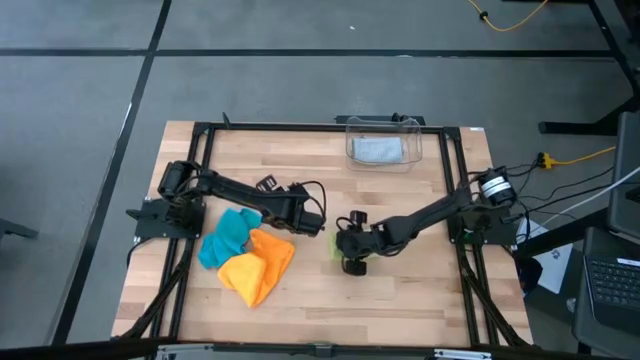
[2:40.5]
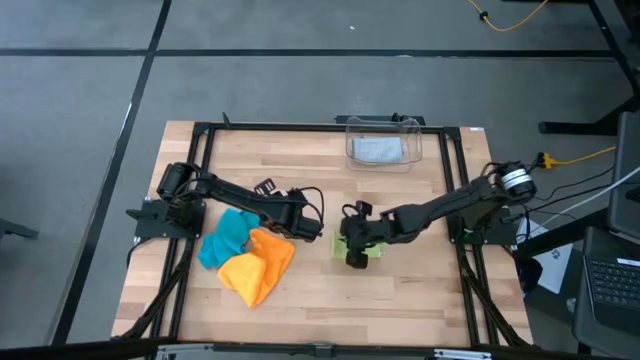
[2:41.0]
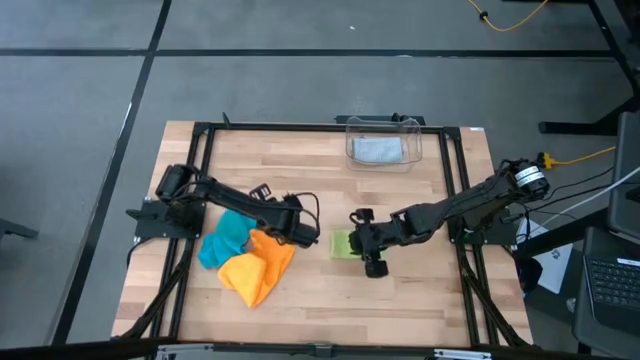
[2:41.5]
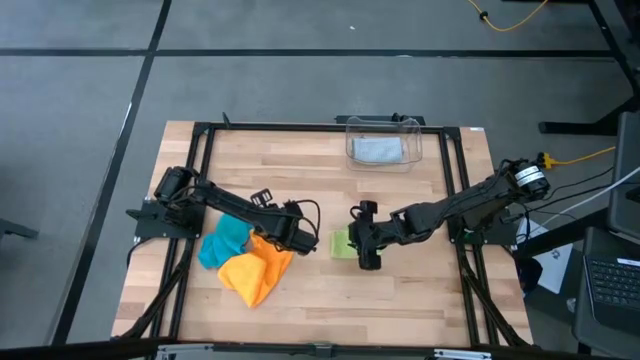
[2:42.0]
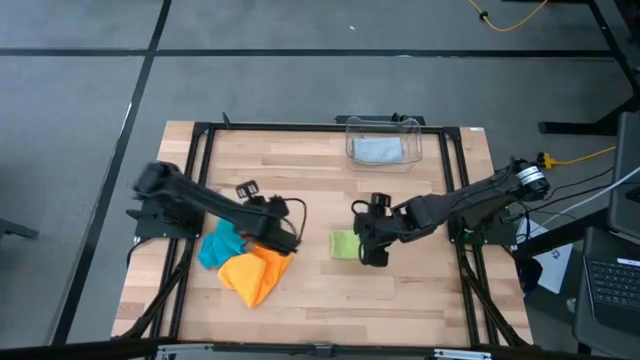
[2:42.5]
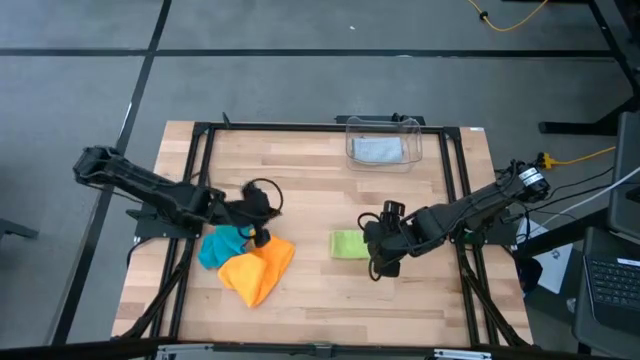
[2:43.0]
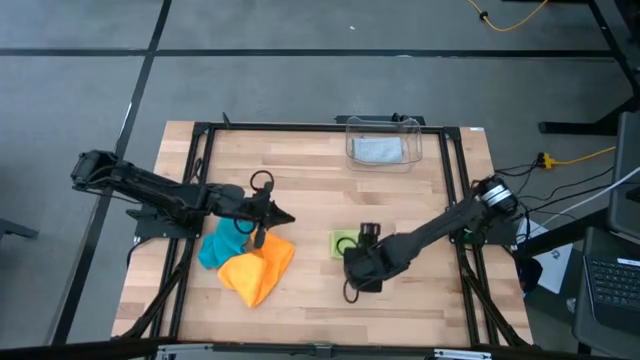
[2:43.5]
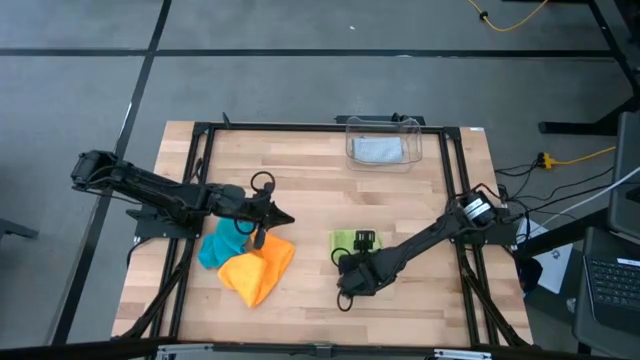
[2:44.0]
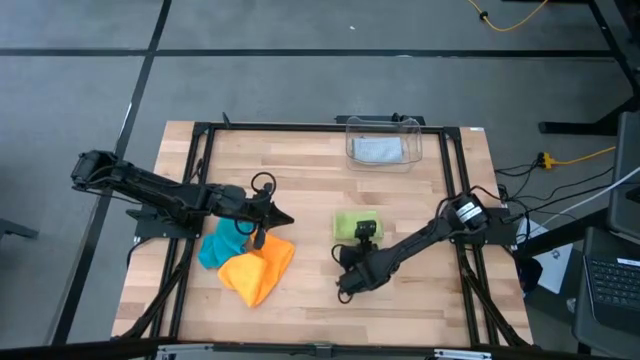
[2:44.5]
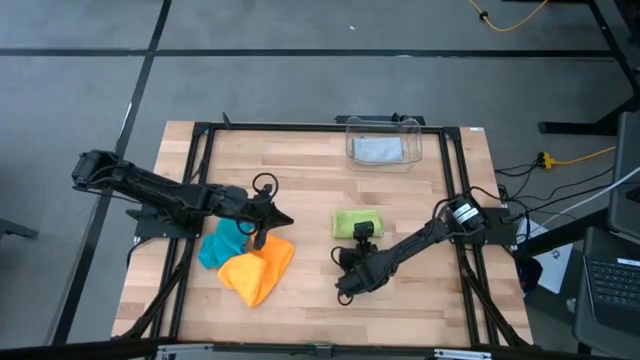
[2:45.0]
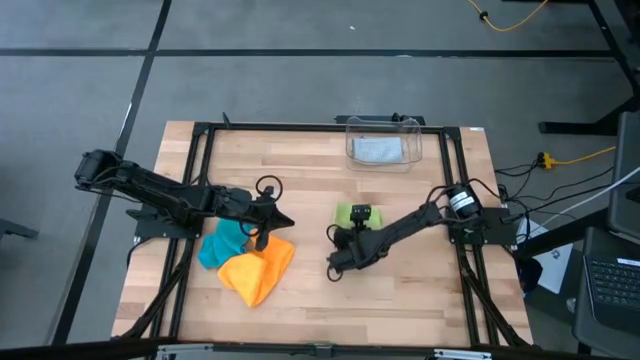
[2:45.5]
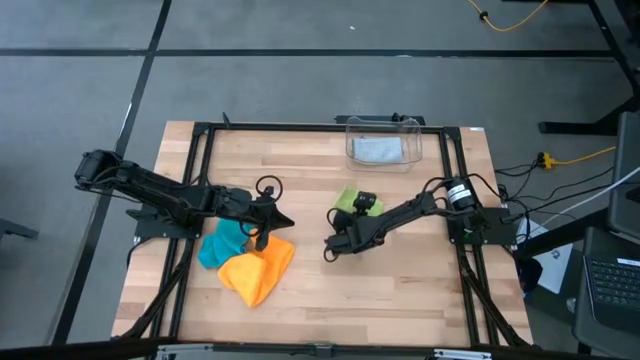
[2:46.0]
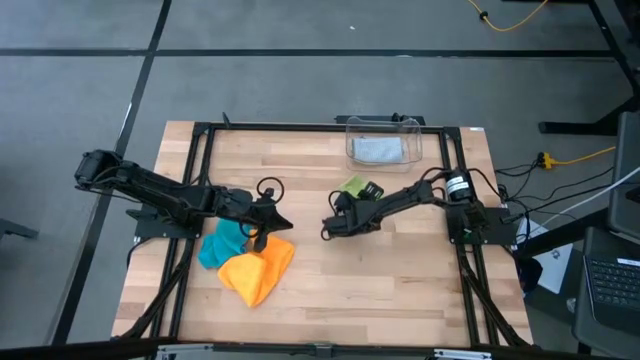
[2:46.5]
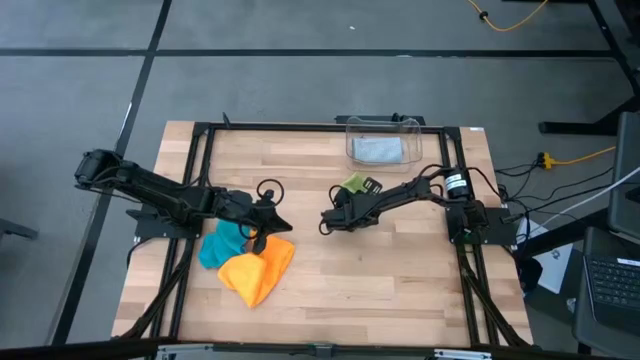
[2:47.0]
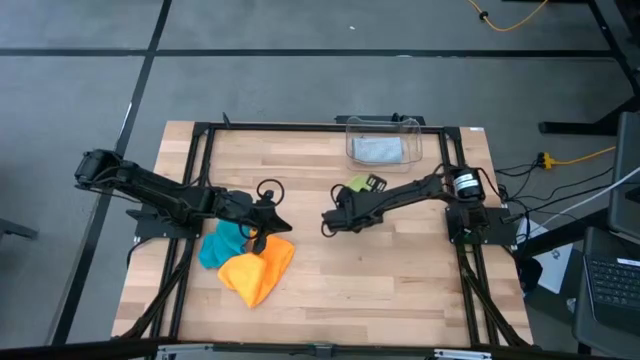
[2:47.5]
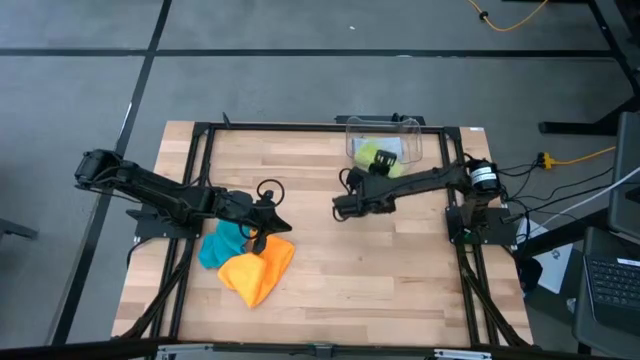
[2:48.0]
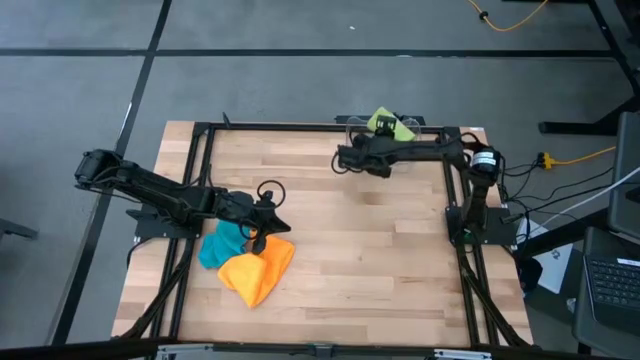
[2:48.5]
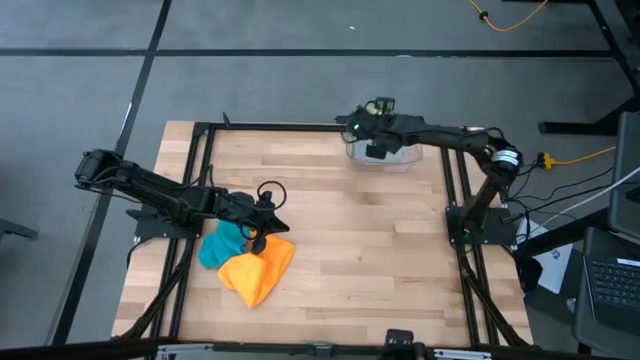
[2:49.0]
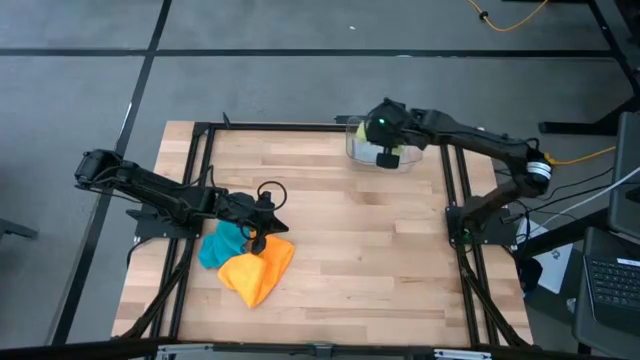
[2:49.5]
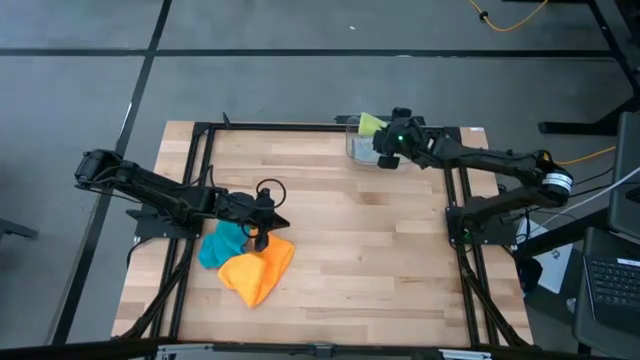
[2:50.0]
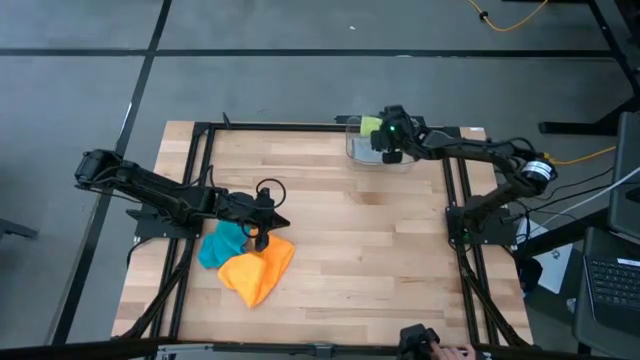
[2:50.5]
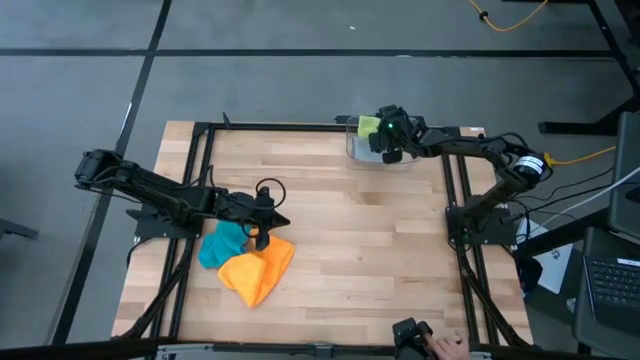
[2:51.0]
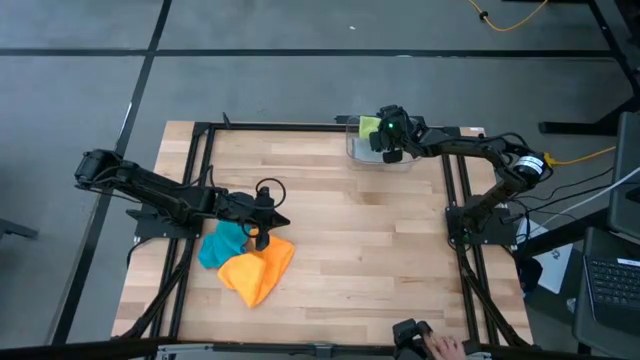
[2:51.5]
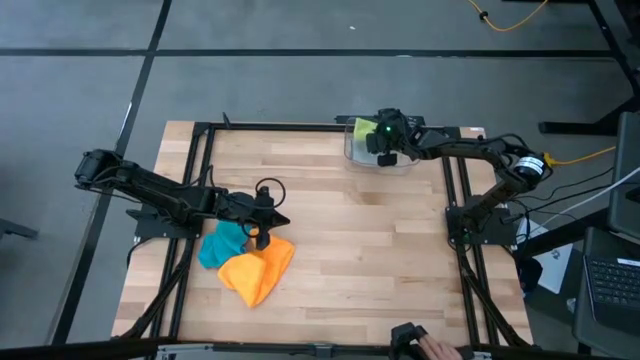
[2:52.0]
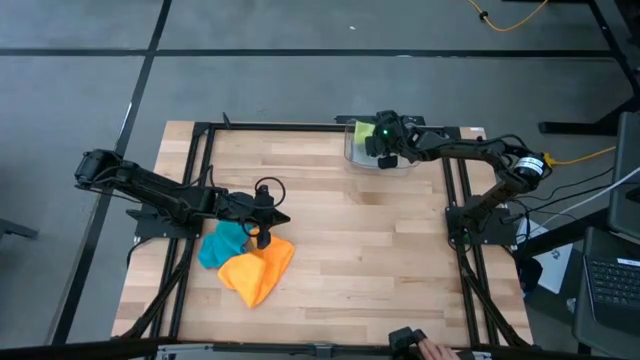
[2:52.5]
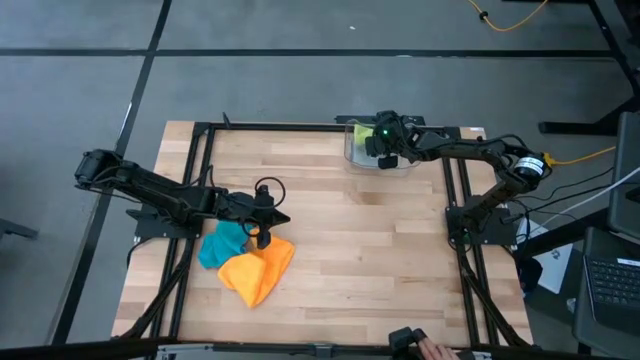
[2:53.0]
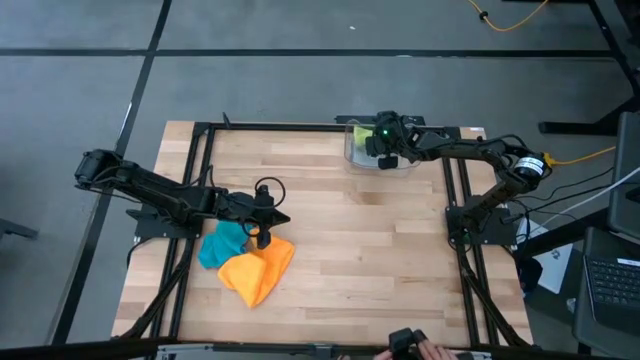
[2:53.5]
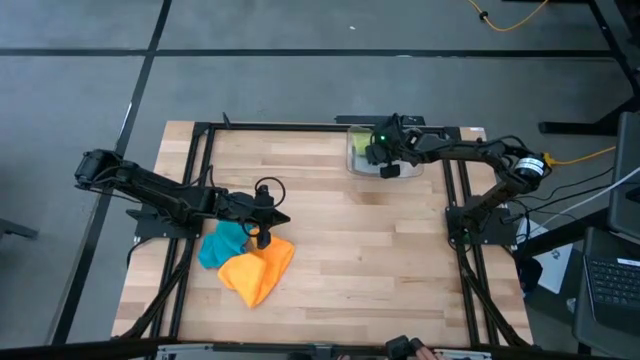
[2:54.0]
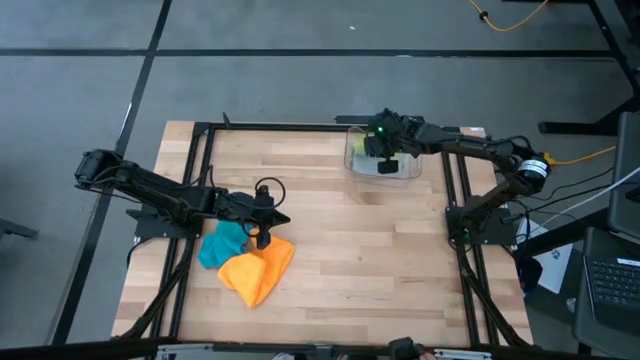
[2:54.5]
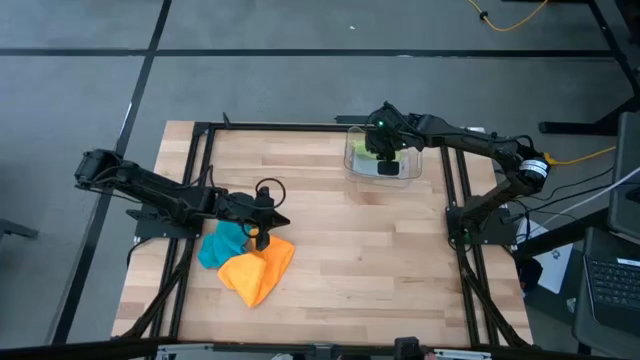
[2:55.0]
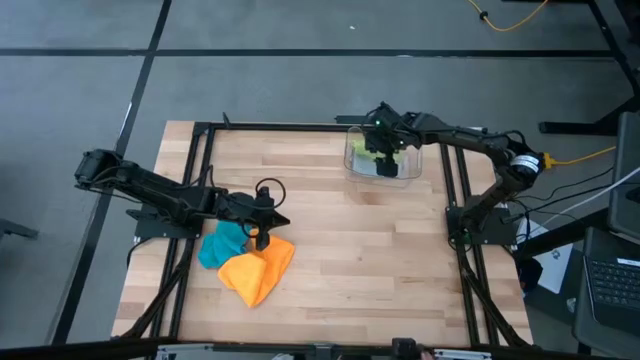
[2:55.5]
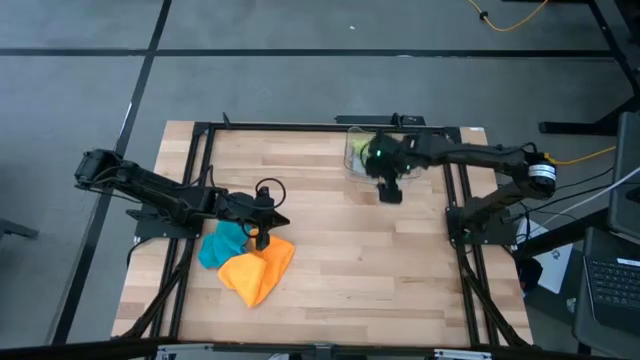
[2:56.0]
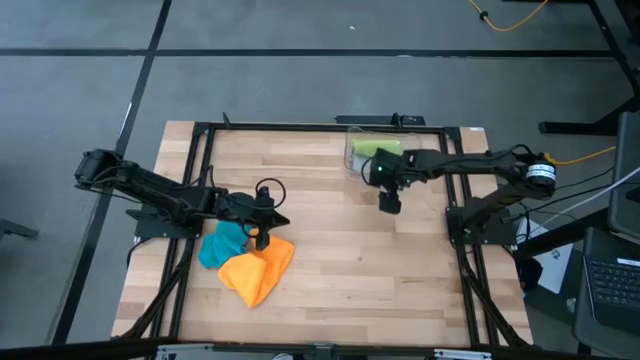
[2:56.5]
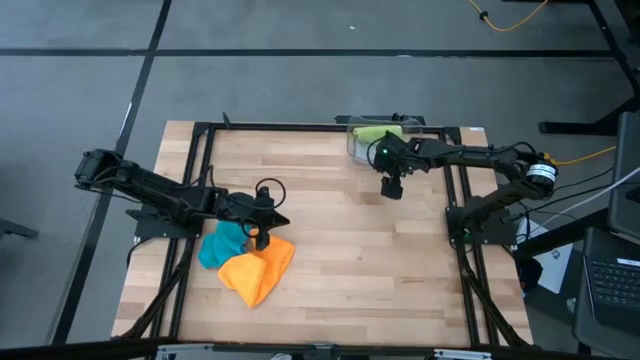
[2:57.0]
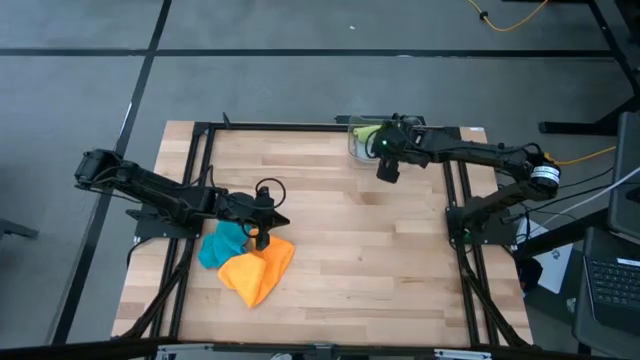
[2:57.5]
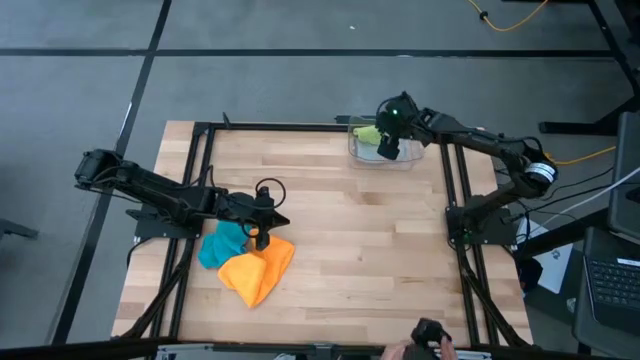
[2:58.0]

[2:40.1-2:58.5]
Task: Fold microfiber towels
Put the folded green microfiber into the transparent bin

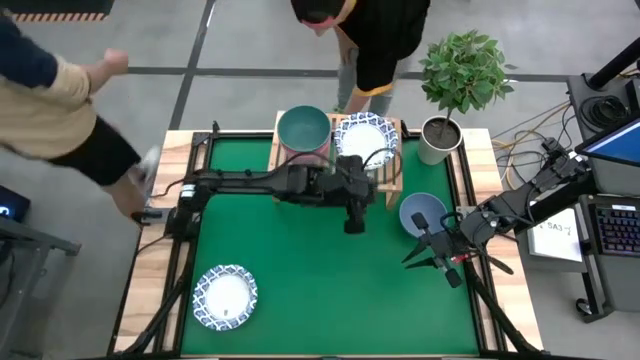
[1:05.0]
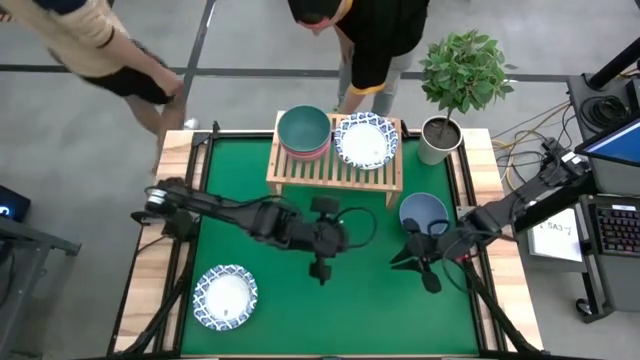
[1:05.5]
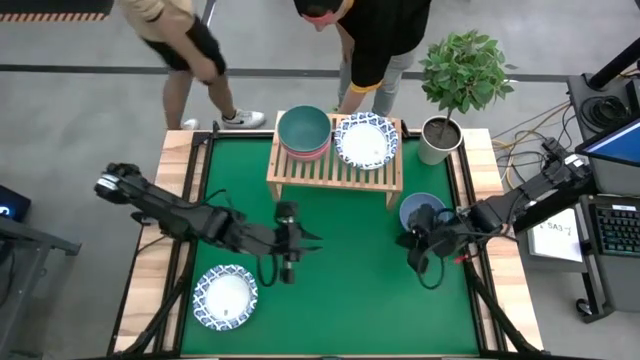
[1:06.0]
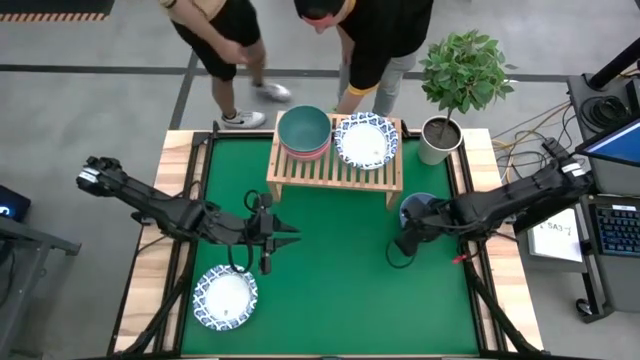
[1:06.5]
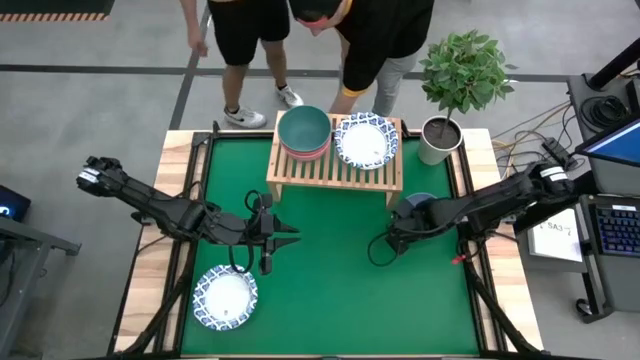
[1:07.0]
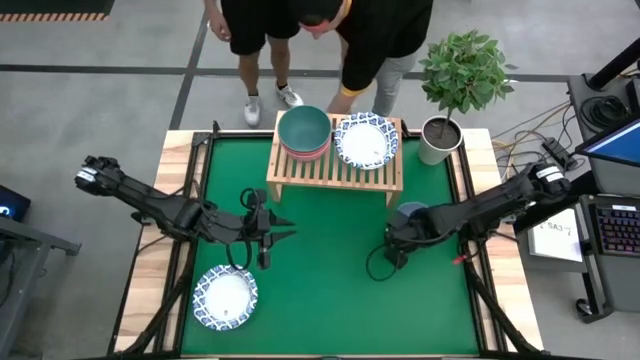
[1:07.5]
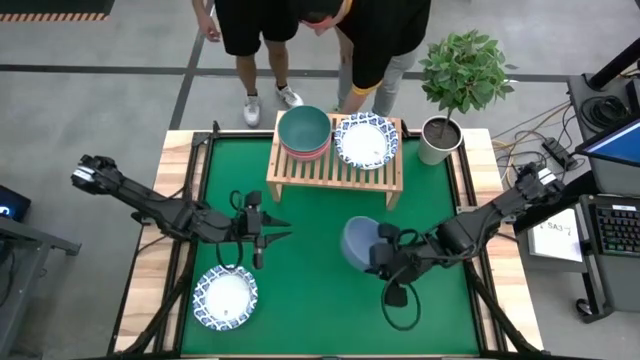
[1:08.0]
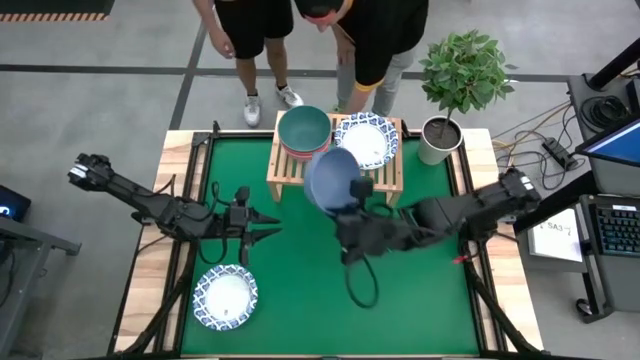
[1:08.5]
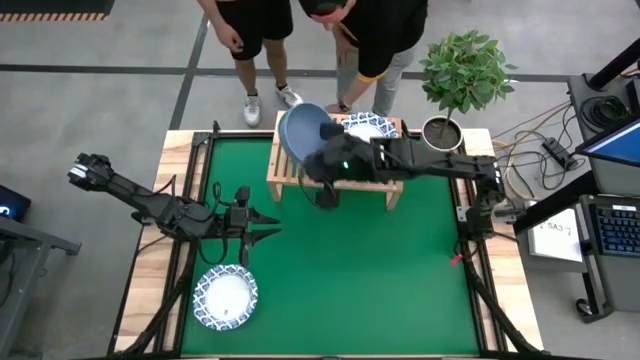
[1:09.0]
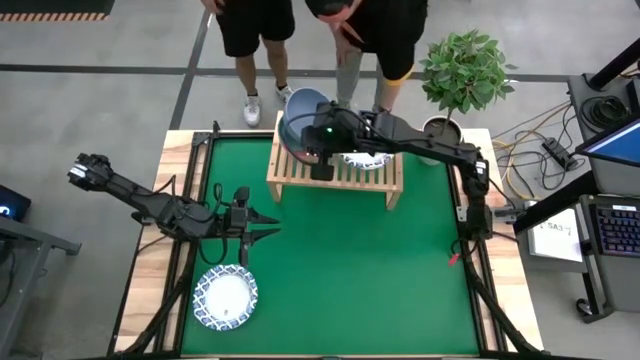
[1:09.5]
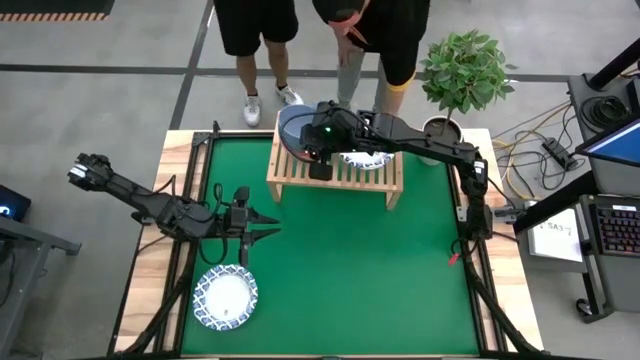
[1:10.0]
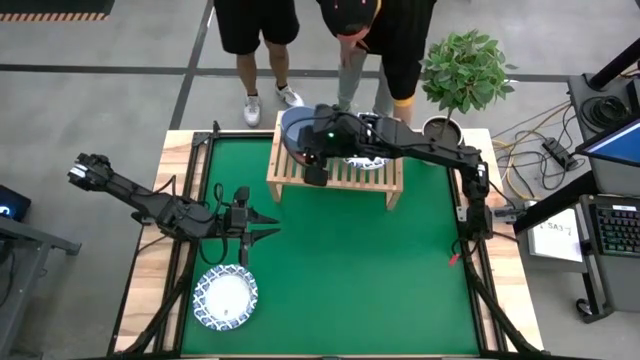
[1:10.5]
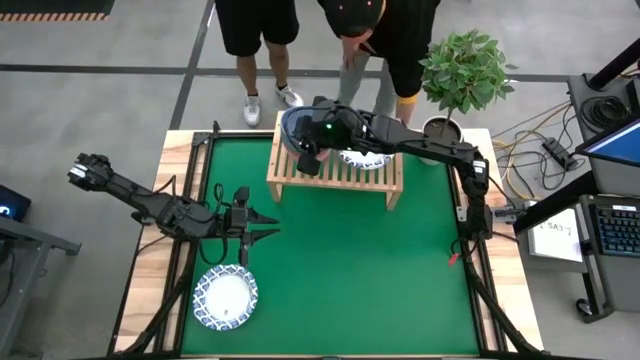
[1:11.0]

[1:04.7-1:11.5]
Task: Place and stack bowls onto a shelf
Stack the blue bowl on top of the green bowl on the shelf
